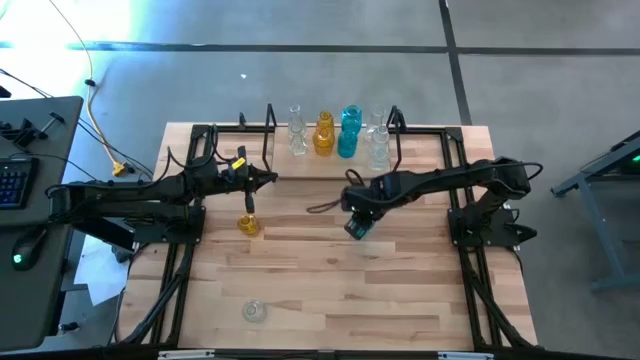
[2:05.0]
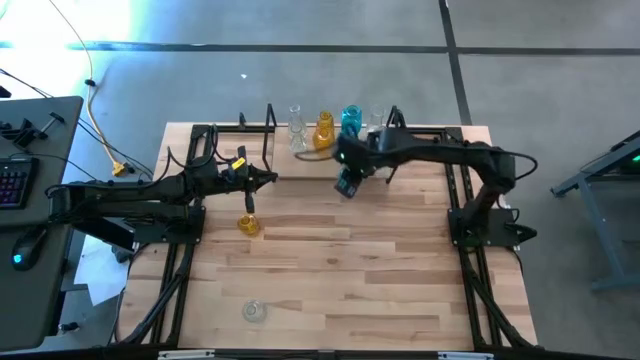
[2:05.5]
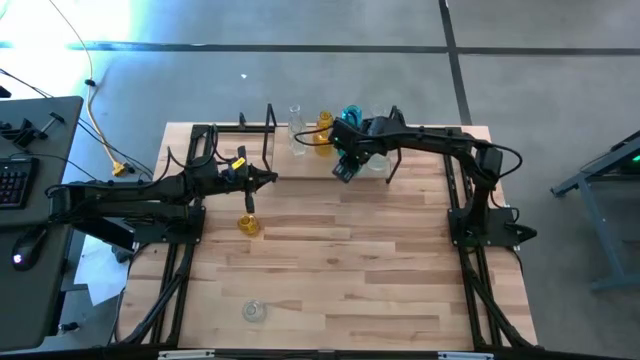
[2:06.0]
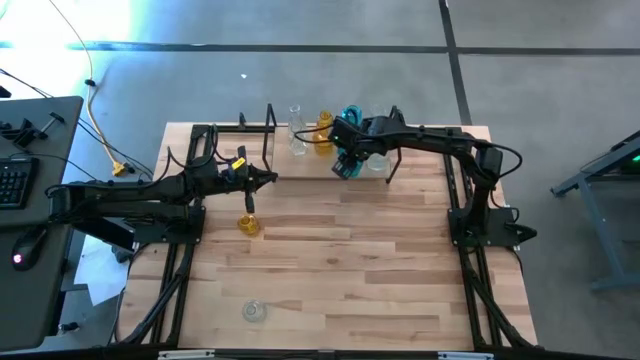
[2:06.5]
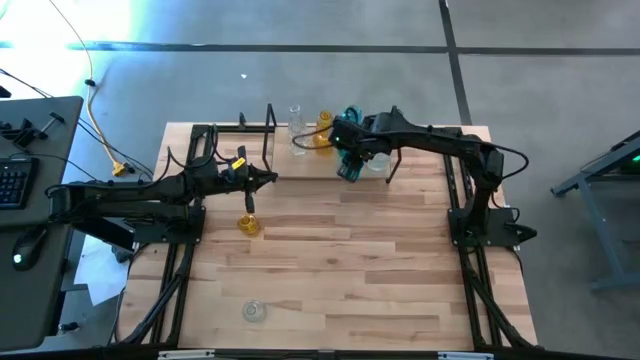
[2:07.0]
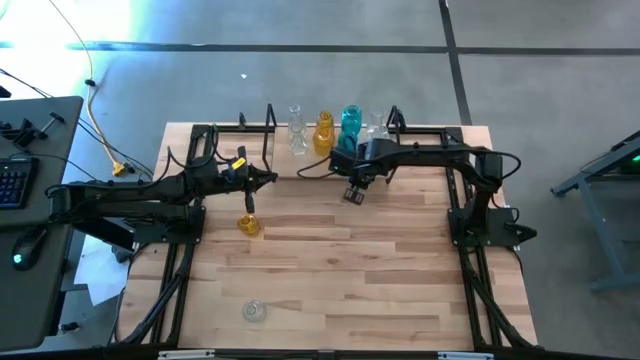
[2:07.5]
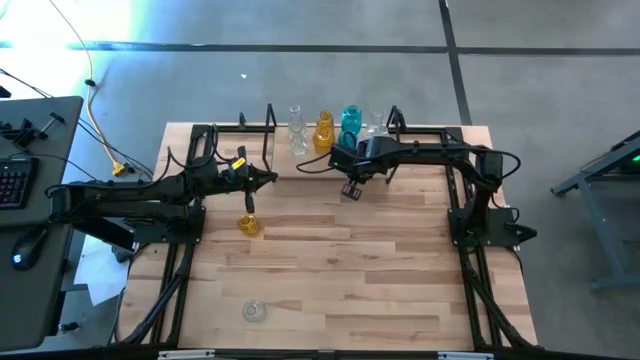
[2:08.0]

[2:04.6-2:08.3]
Task: sort vases onto shelf
Put the blue vase on the shelf aligned with the other blue vase

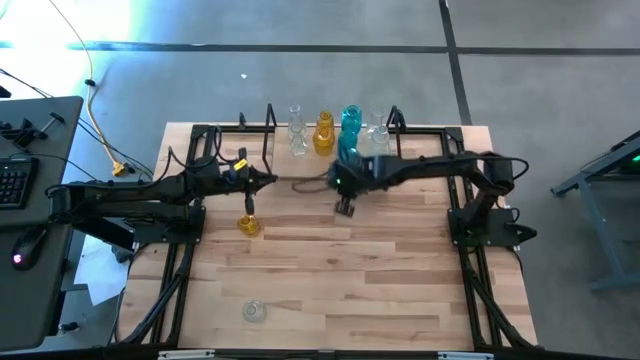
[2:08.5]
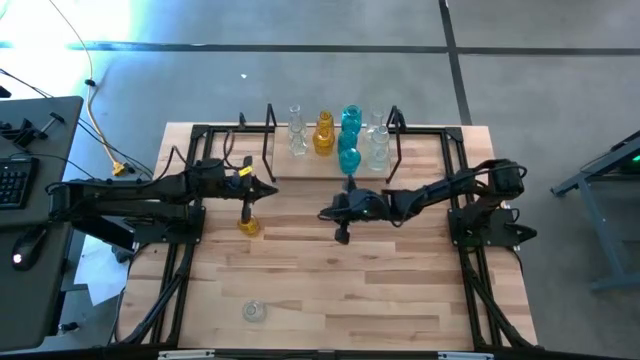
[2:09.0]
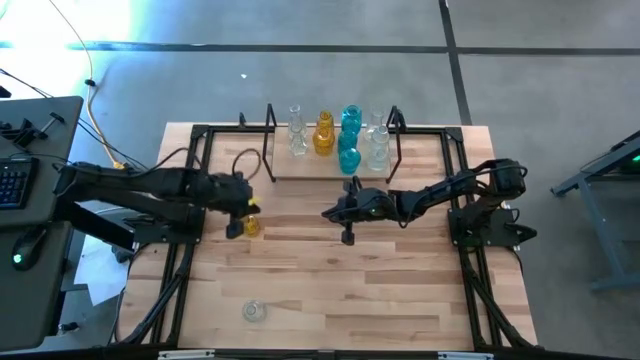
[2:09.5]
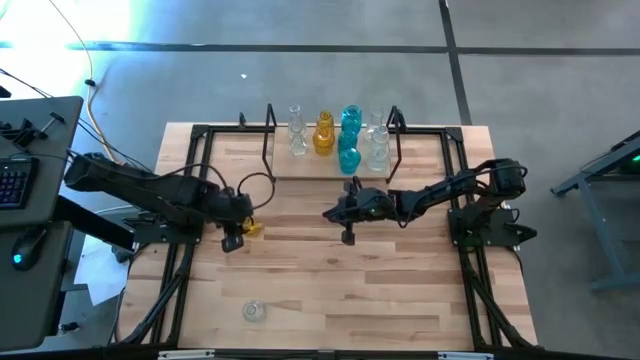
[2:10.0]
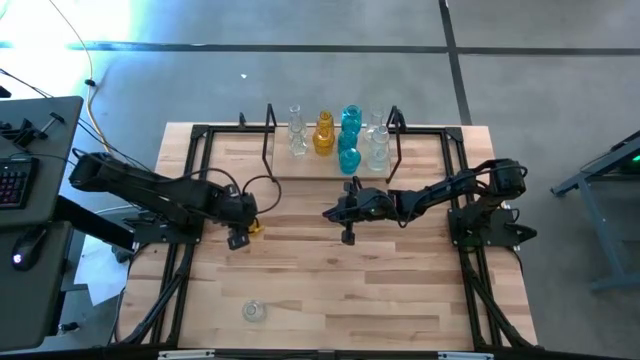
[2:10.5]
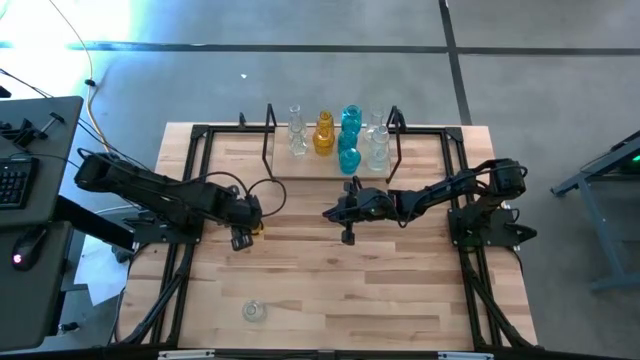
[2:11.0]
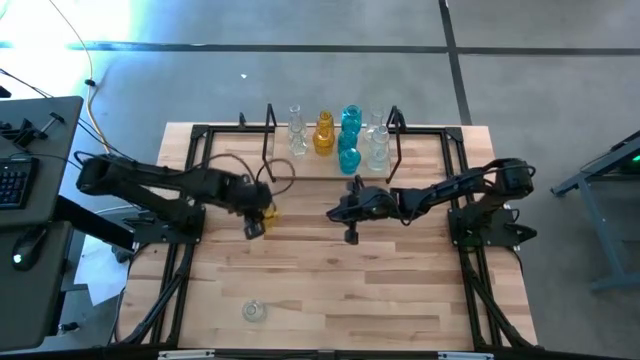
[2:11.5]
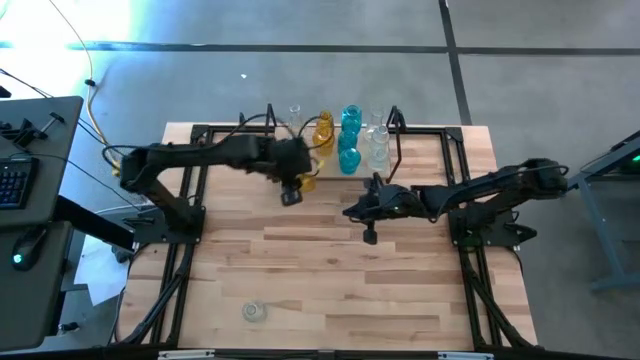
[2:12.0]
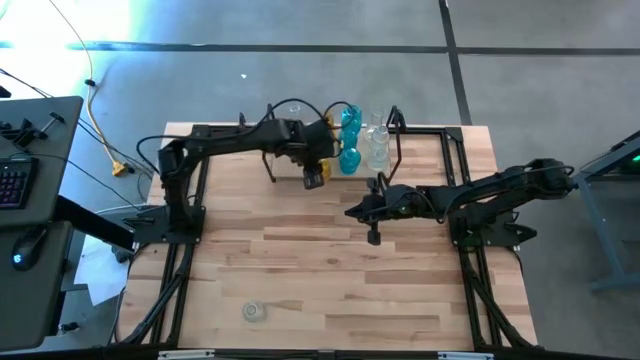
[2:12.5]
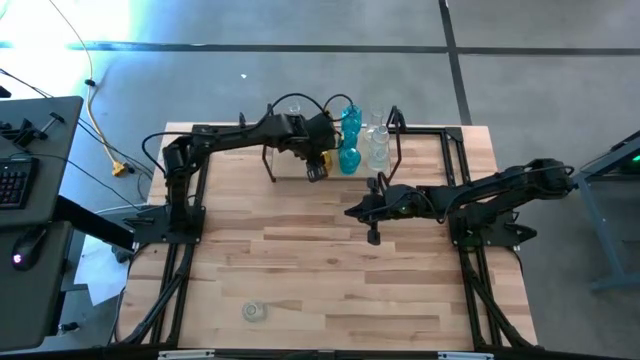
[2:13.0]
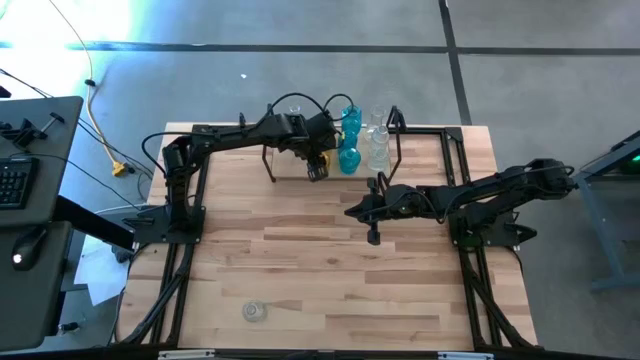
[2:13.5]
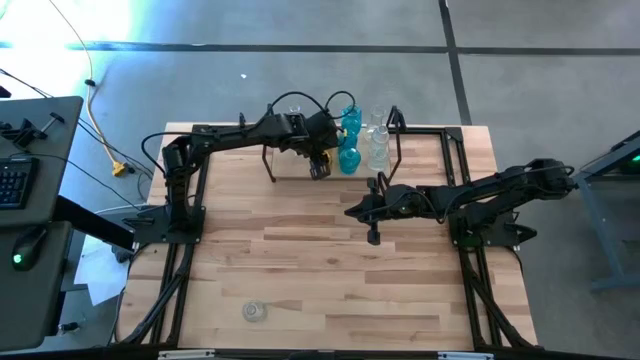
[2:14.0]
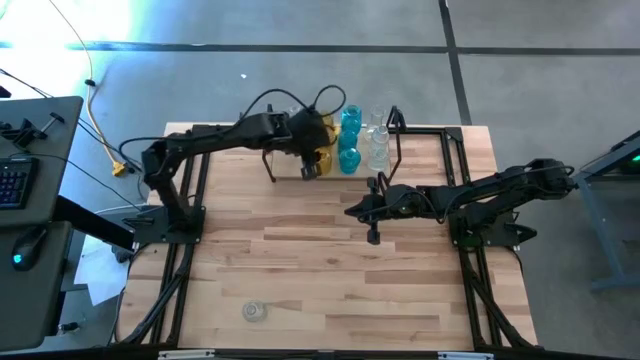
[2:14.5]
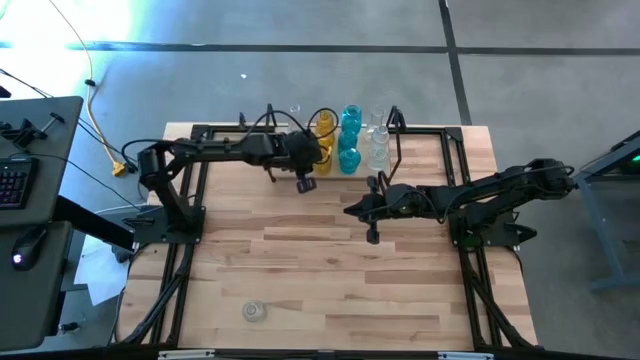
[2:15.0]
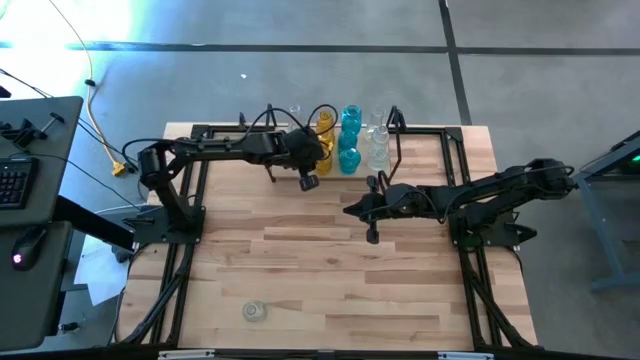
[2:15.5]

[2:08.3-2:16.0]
Put the yellow vase on the shelf aligned with the other yellow vase

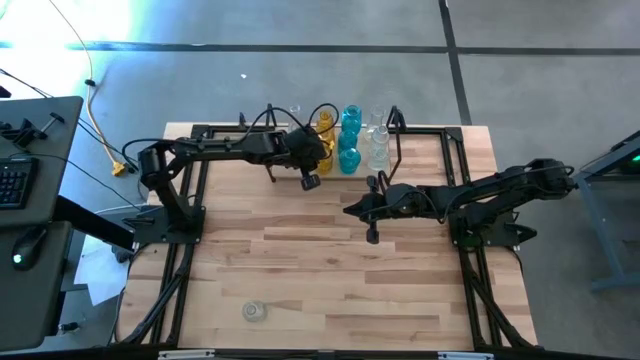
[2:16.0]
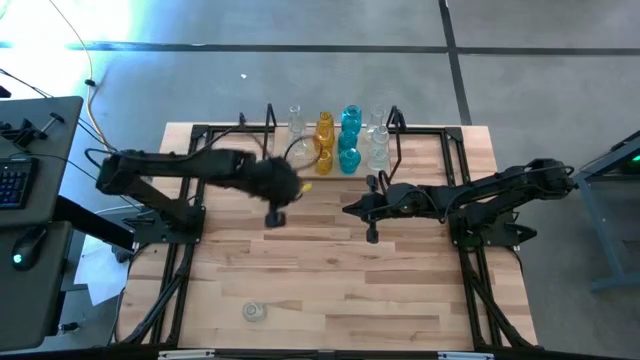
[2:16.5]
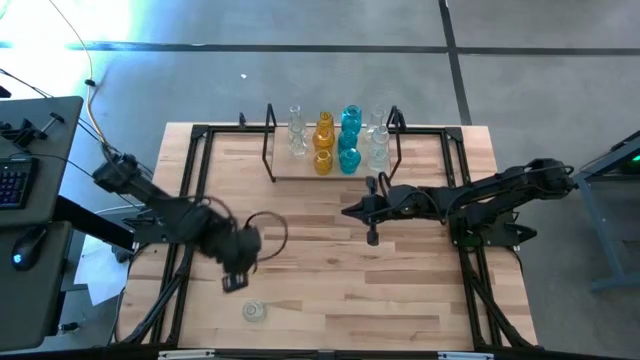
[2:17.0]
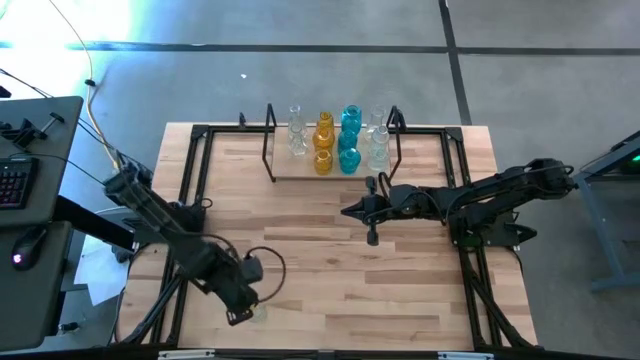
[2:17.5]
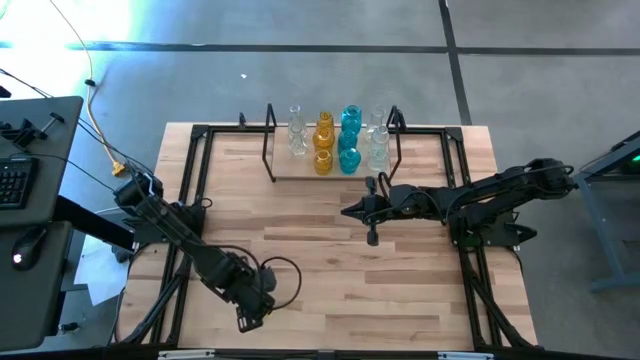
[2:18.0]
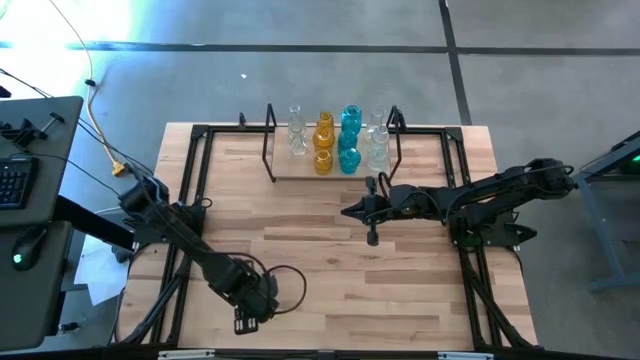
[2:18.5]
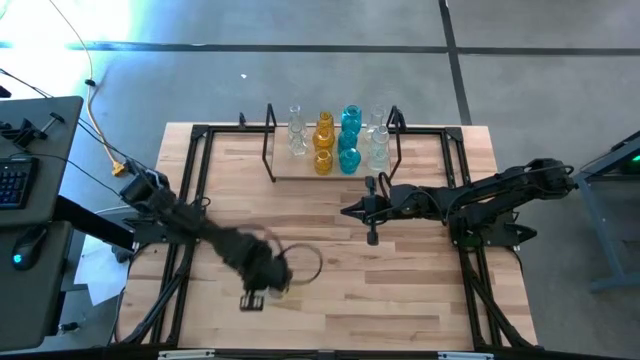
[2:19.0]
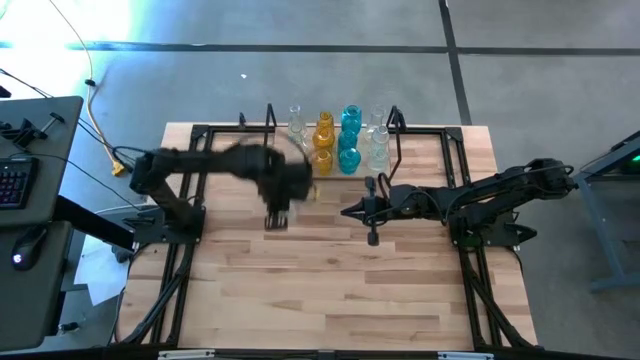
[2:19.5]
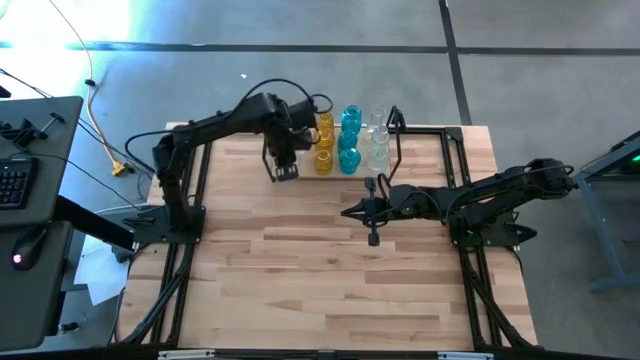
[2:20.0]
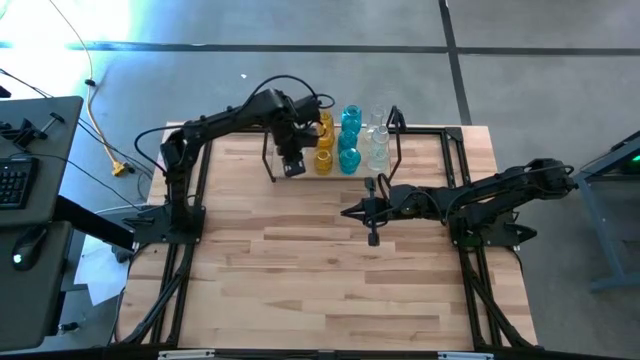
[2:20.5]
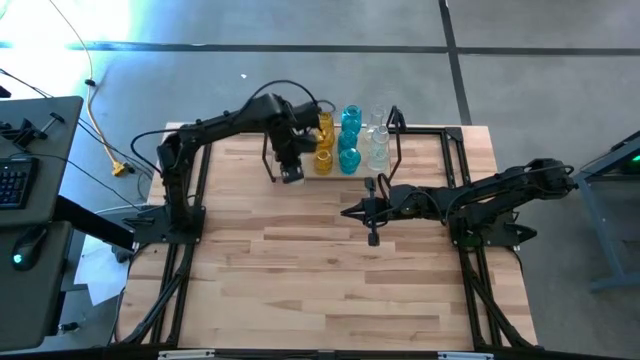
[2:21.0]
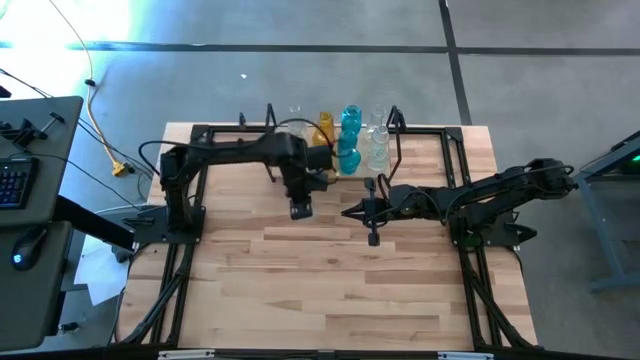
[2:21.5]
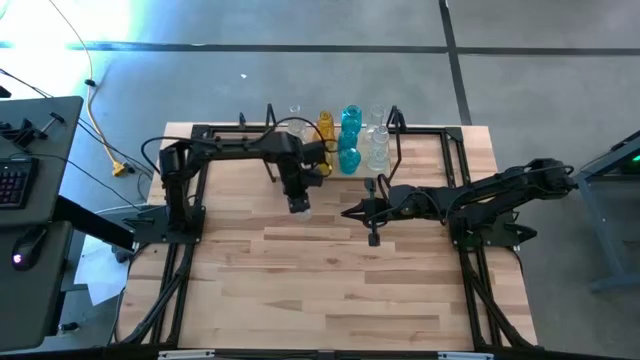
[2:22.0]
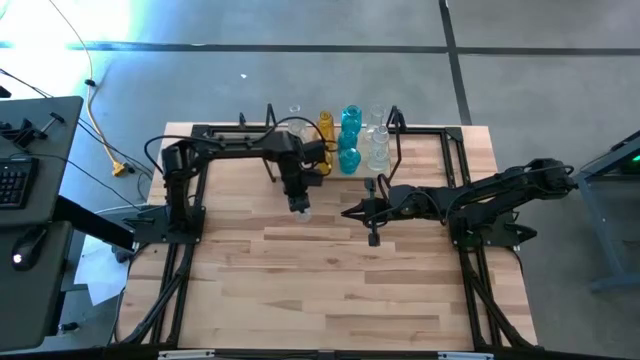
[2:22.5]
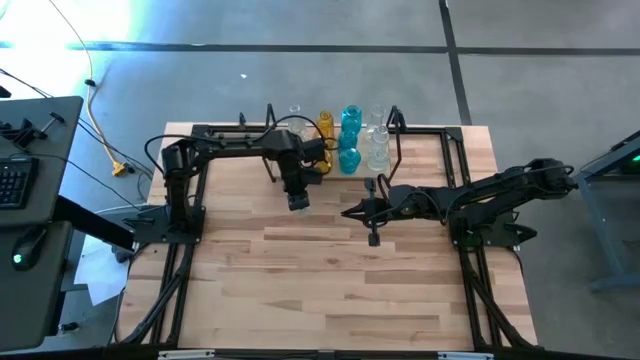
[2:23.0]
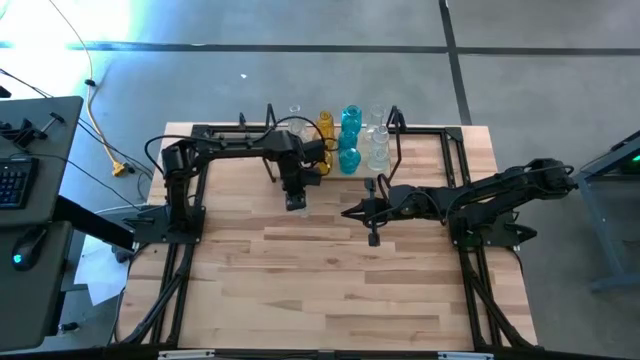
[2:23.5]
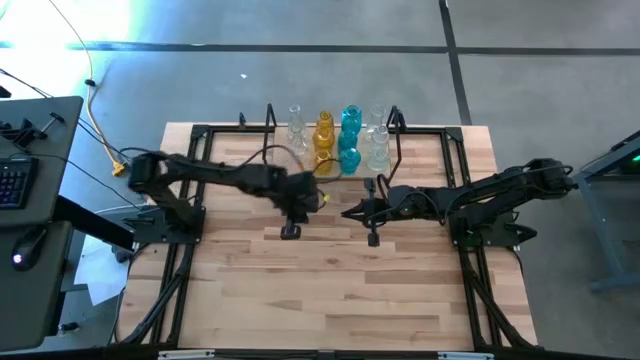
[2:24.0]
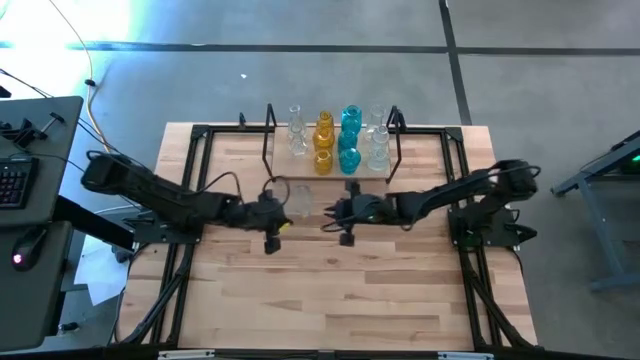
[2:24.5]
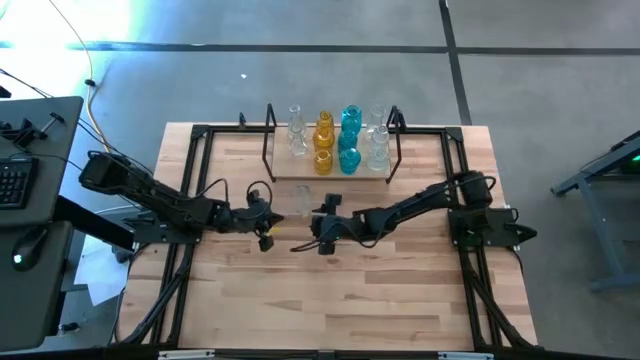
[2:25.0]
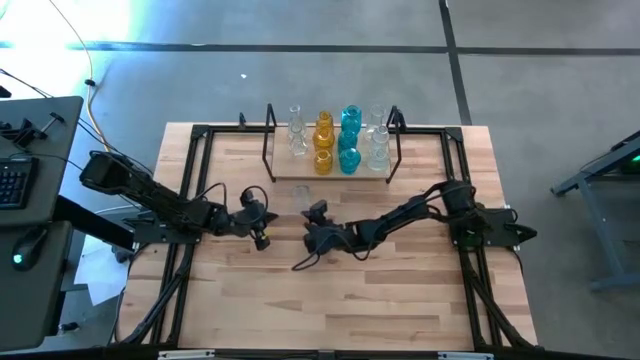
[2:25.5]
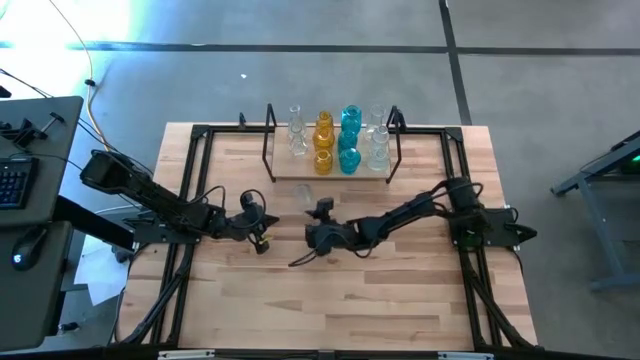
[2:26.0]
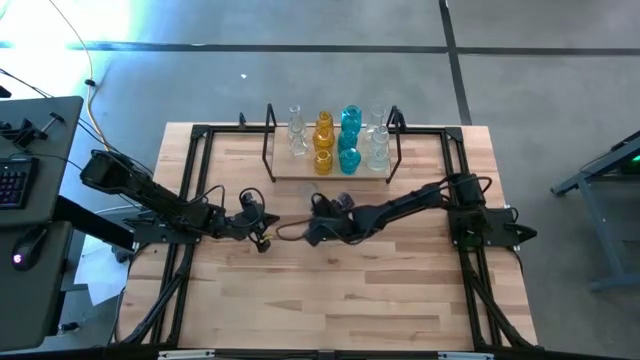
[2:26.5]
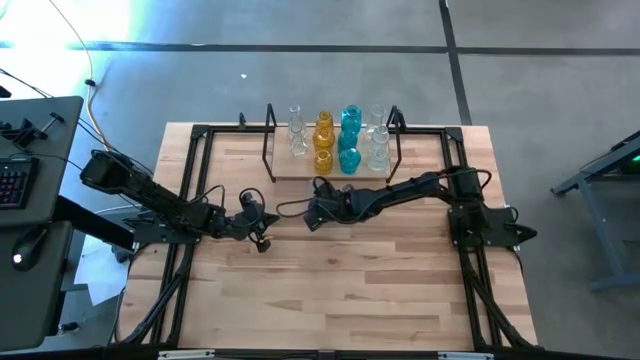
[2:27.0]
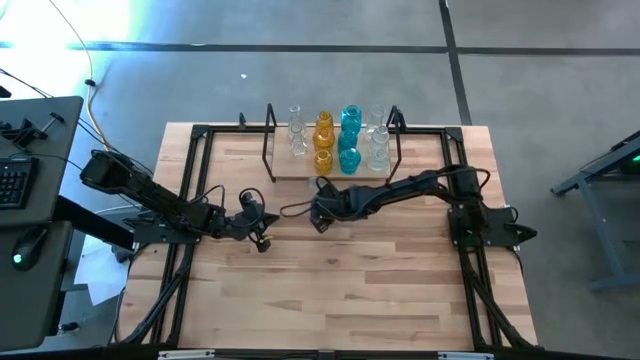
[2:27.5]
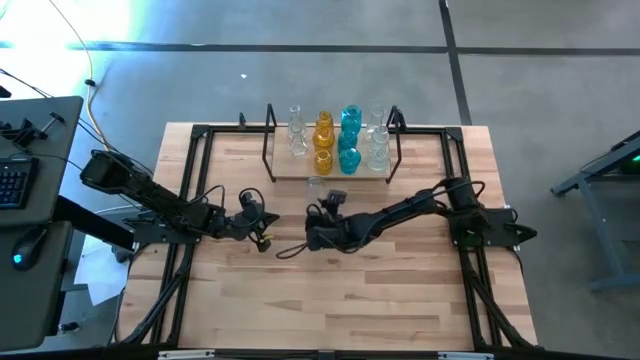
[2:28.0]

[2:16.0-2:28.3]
Put the transparent vase on the shelf aligned with other transparent vase
